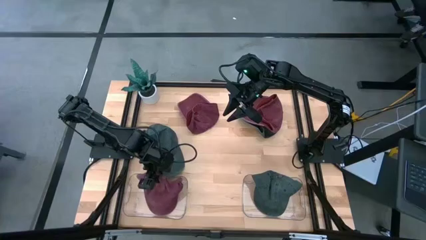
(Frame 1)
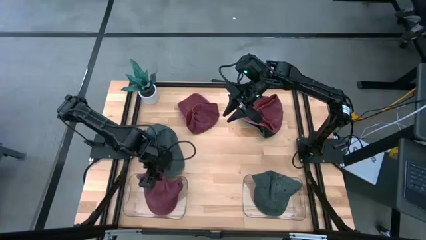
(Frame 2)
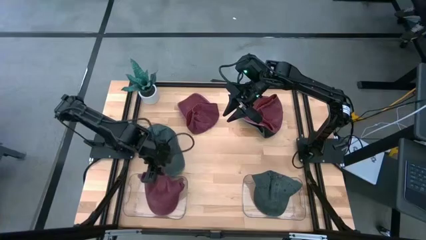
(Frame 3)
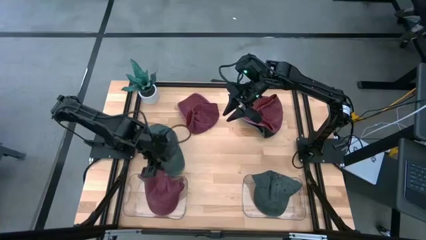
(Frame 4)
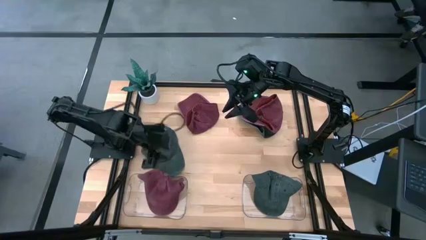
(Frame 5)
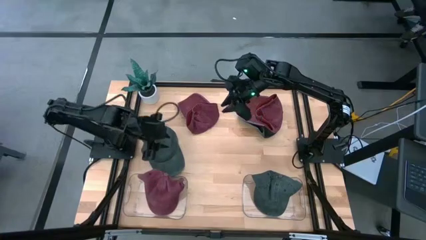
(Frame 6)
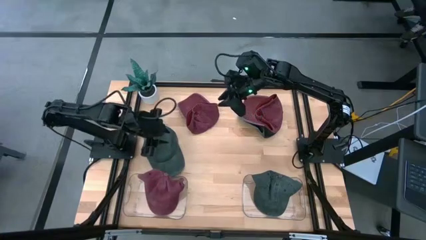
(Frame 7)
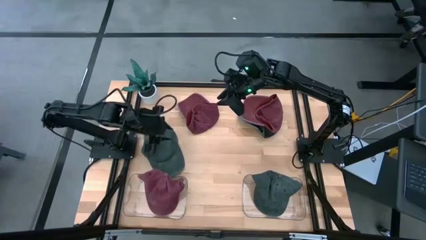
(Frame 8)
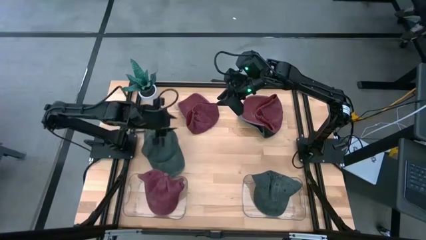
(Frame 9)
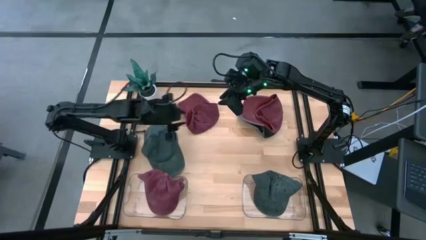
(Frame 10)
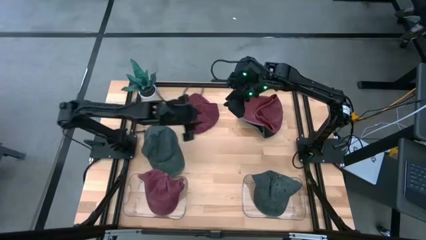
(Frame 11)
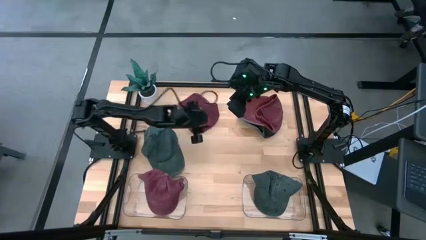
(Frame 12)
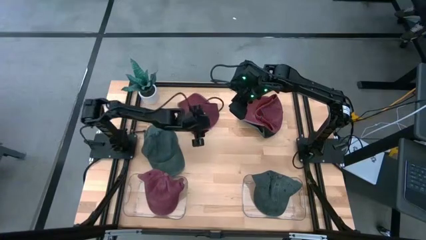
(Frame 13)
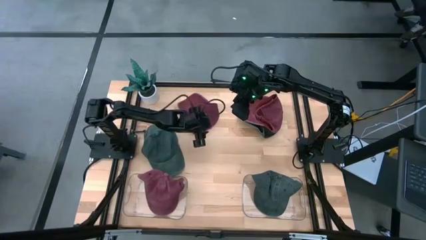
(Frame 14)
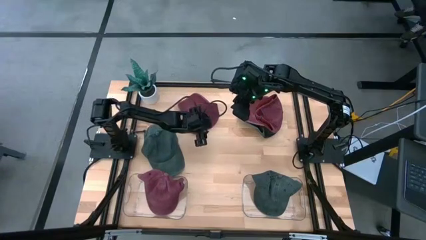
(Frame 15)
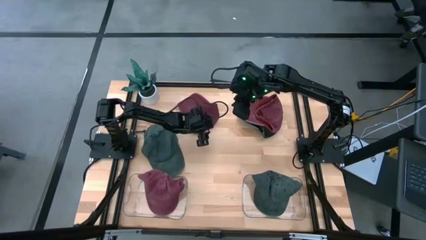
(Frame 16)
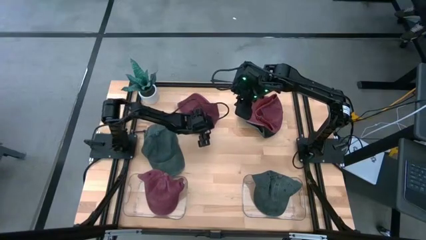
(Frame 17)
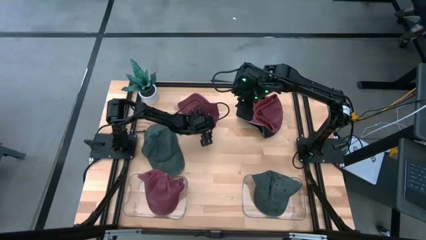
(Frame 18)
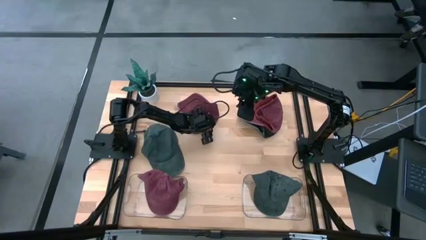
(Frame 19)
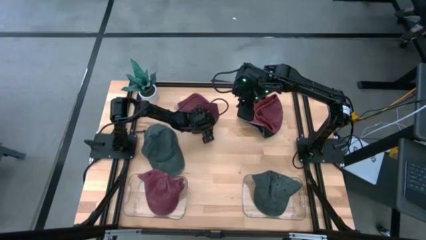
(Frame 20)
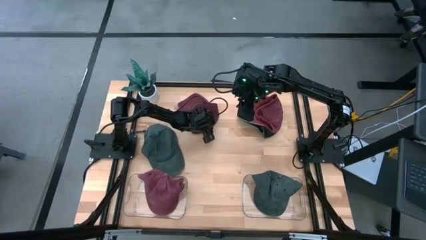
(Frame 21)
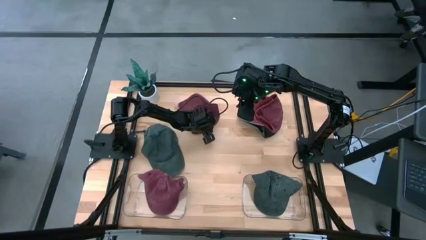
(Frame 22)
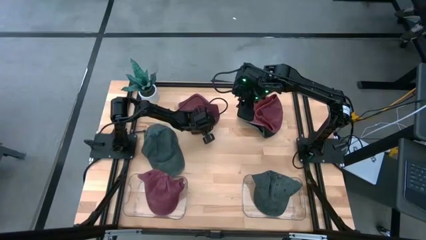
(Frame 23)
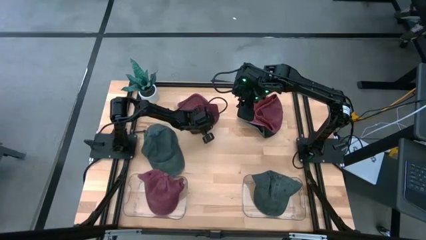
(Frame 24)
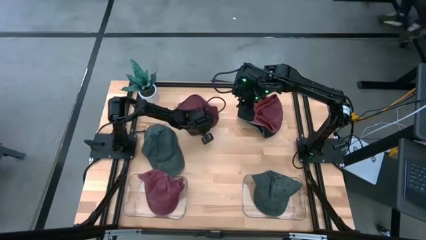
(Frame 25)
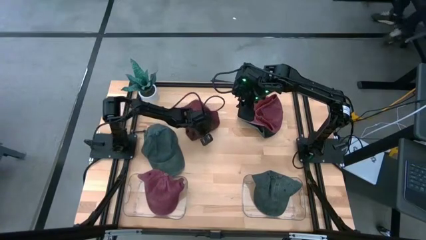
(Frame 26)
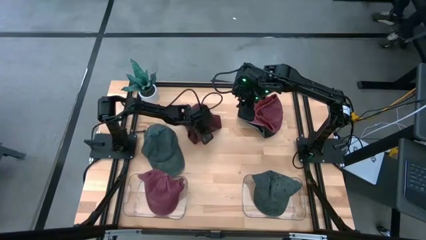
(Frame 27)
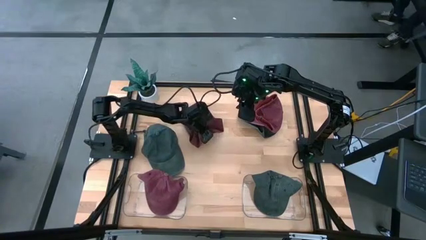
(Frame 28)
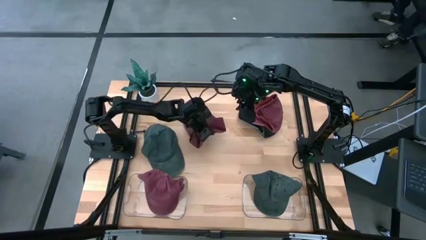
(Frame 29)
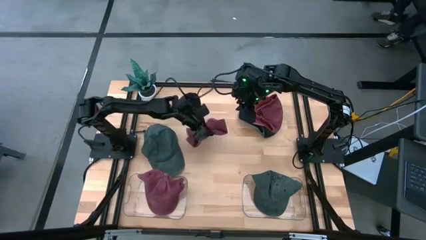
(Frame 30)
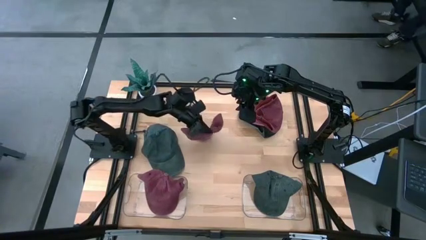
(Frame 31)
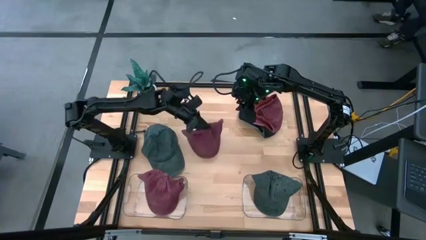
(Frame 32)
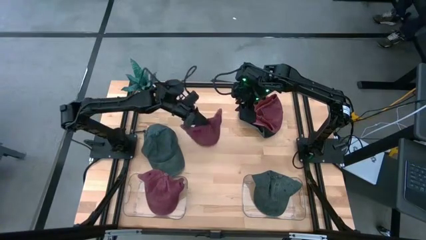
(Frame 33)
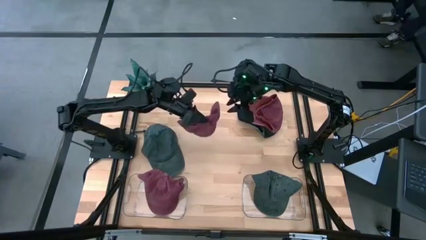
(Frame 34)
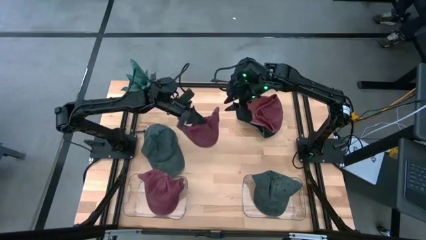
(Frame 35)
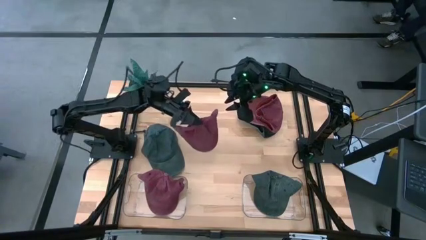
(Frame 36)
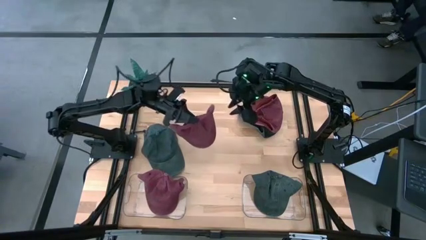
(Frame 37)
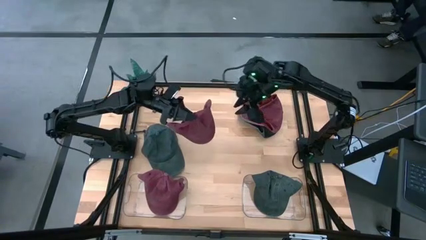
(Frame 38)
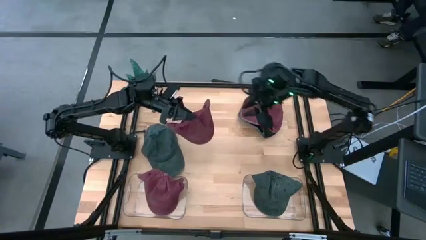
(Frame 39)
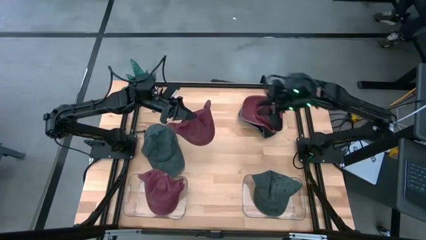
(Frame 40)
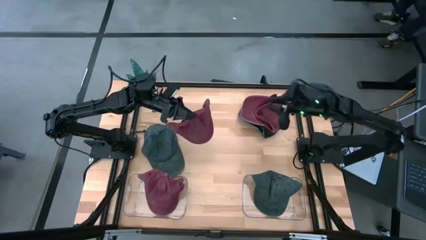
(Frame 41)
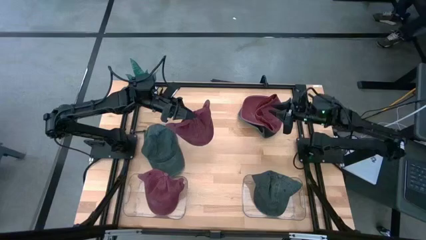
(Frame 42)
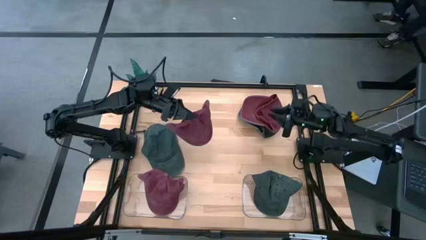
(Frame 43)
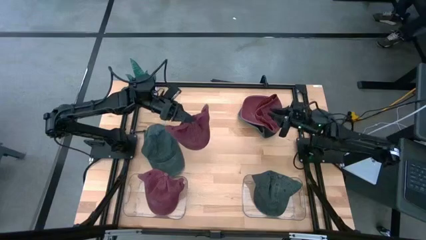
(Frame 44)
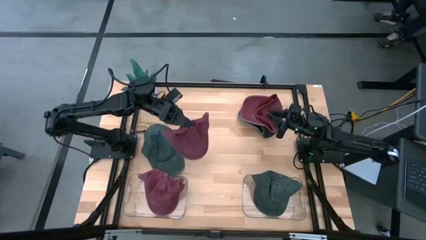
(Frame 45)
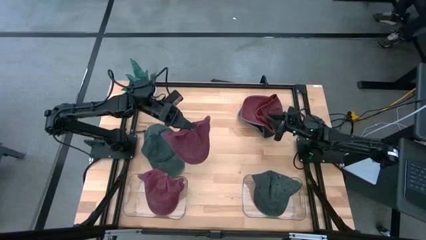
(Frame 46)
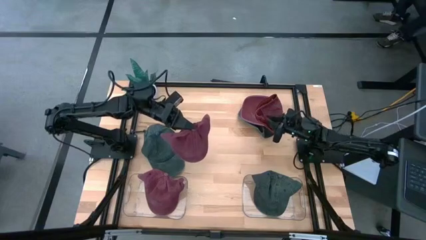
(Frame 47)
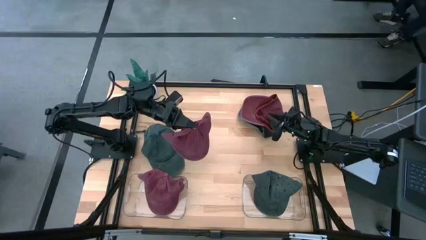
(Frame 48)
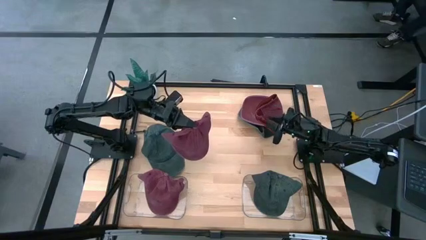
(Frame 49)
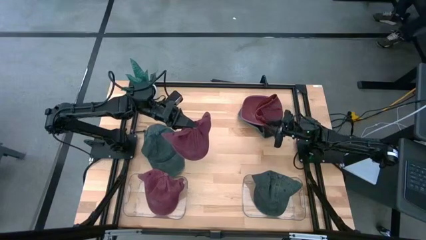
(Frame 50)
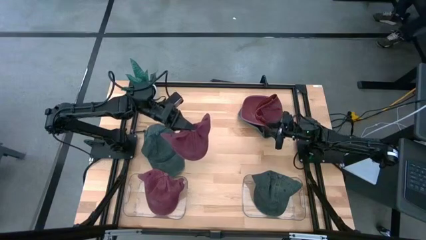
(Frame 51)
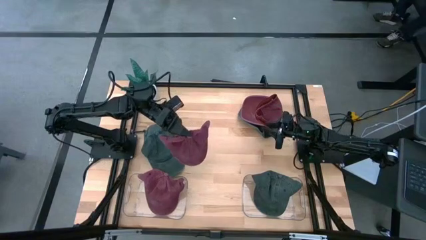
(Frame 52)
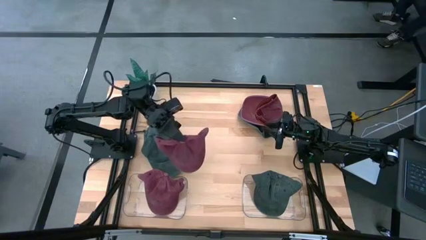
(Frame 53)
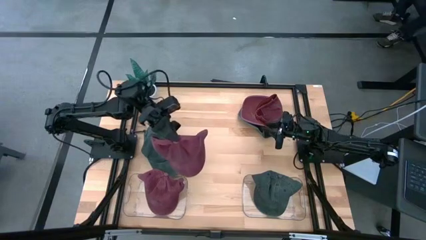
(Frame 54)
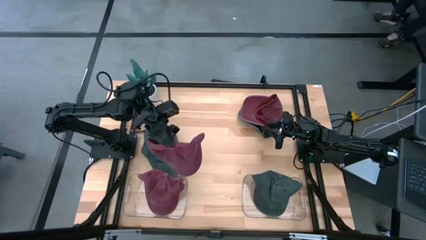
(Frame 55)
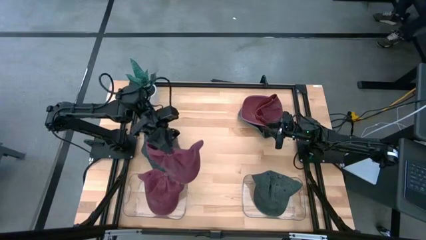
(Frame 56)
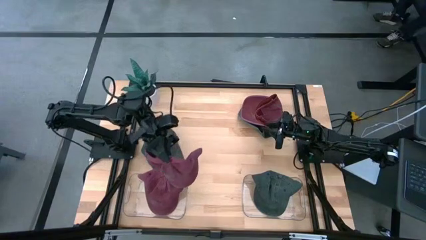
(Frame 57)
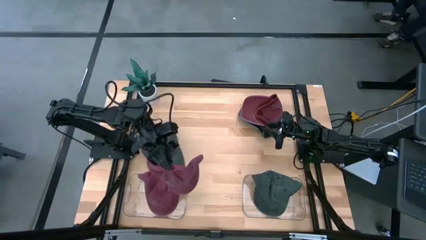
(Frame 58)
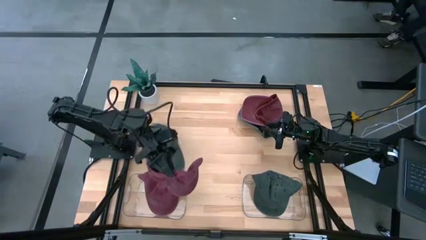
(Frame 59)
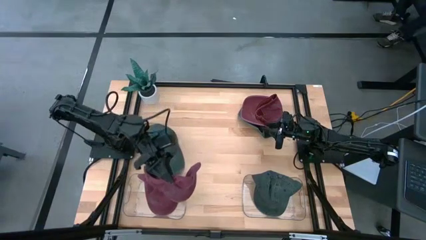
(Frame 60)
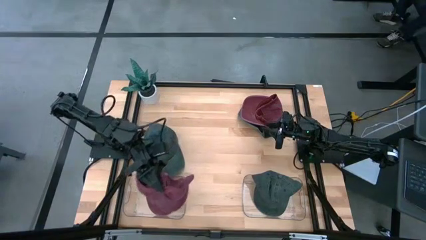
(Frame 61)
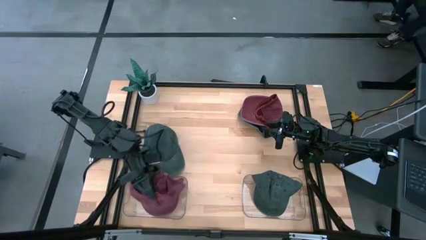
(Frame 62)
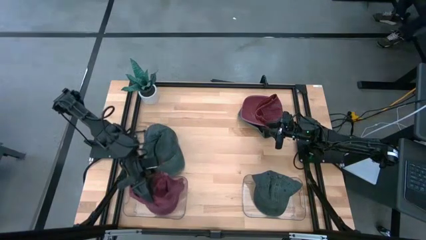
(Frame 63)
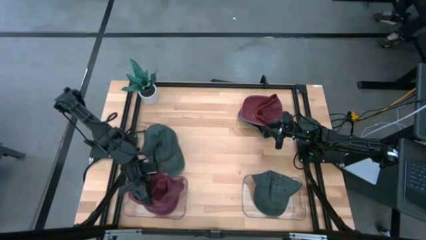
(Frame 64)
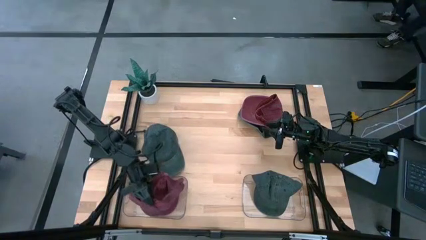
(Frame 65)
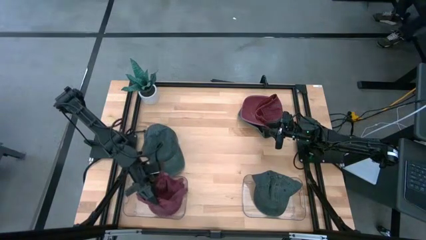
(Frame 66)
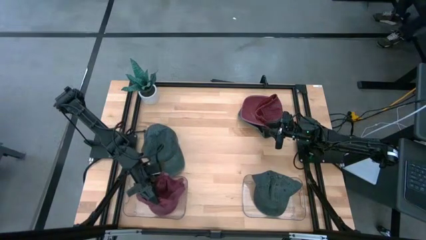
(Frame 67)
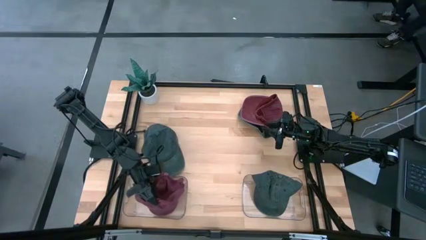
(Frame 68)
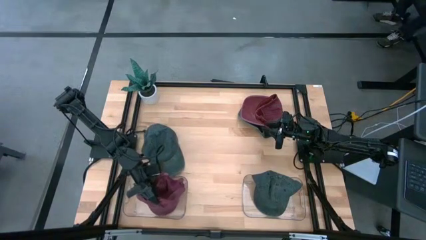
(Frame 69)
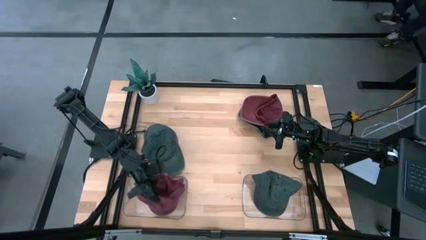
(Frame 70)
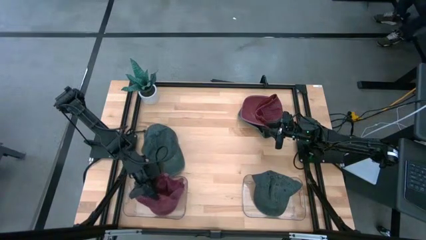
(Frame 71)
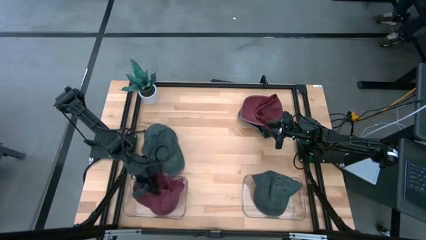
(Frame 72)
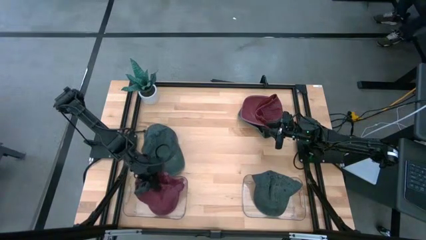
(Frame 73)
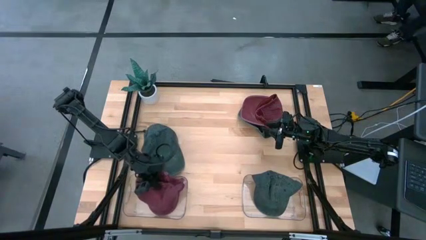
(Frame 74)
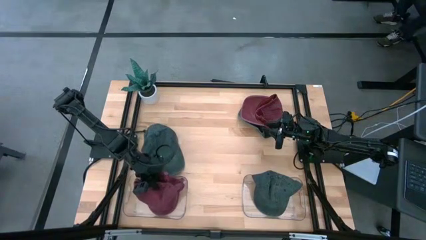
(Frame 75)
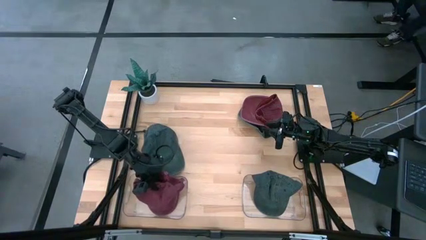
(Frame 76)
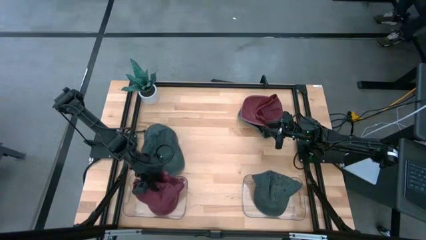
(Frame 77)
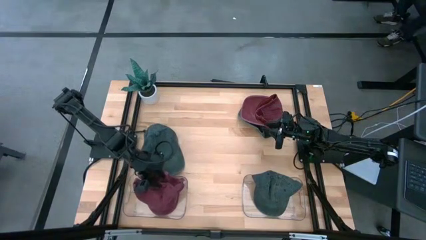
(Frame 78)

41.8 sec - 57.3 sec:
Task: Pick & Place hat
Put the left red cap into the left transparent bin
